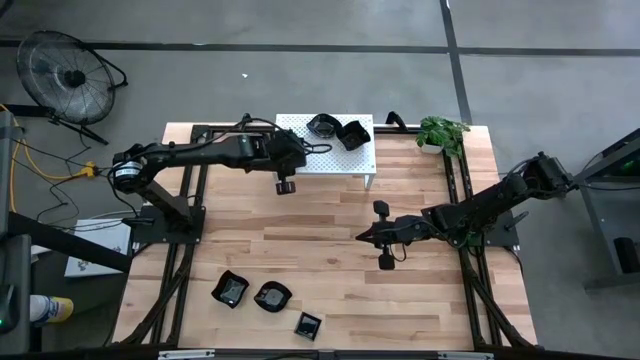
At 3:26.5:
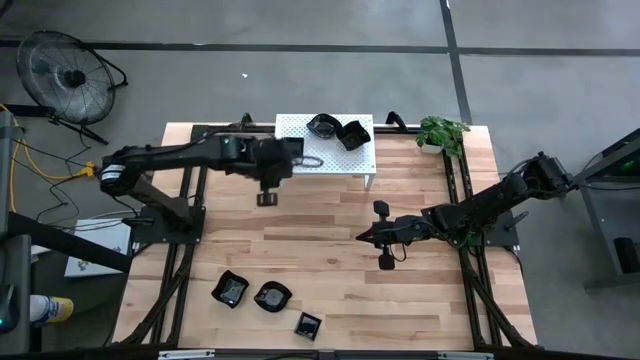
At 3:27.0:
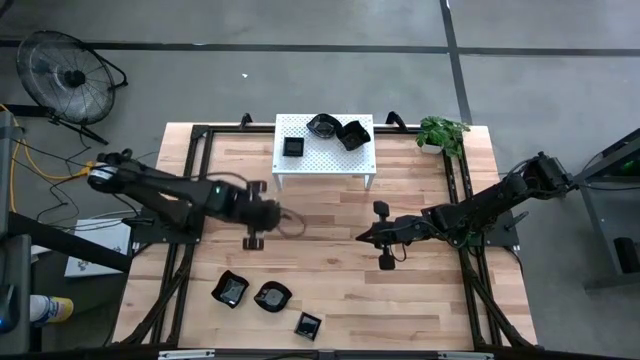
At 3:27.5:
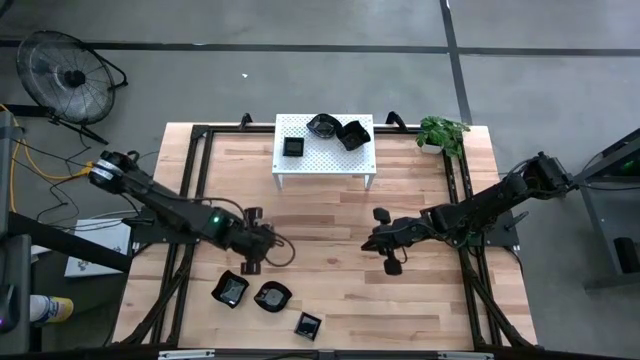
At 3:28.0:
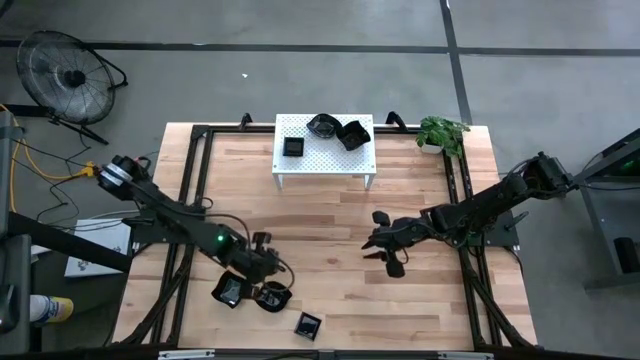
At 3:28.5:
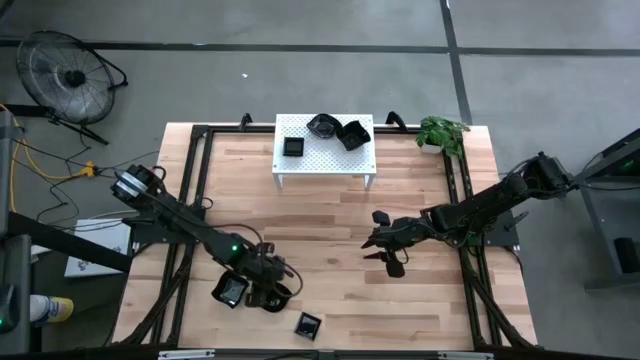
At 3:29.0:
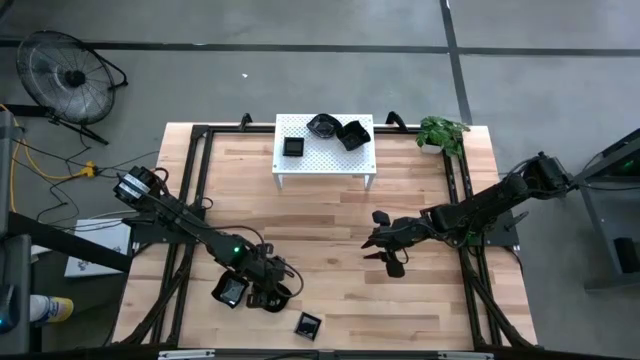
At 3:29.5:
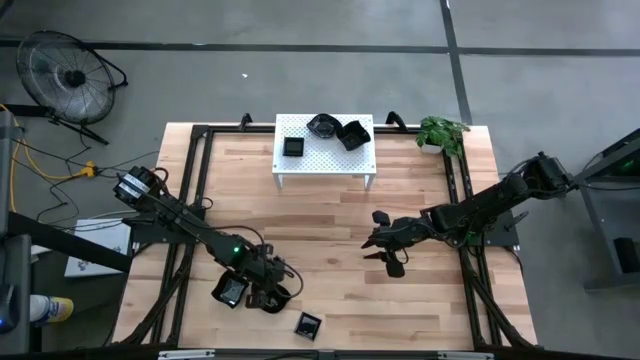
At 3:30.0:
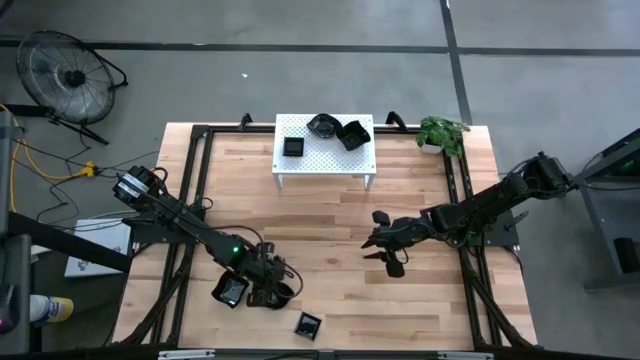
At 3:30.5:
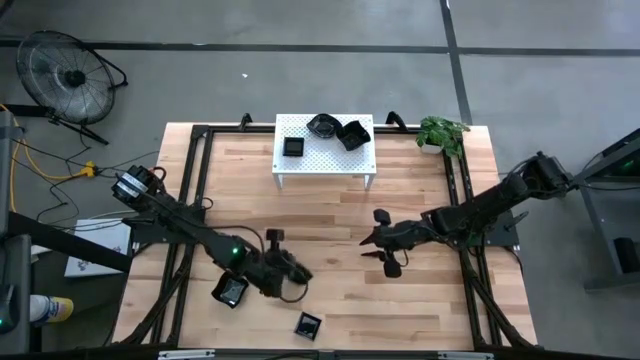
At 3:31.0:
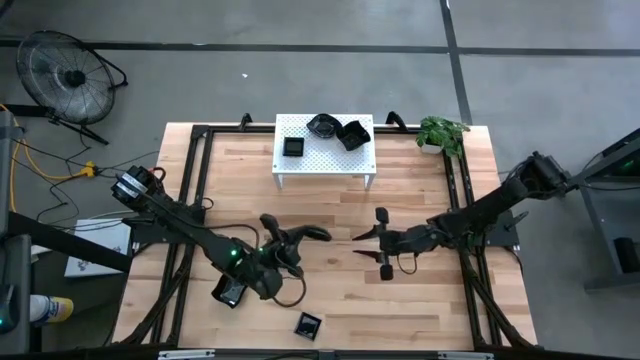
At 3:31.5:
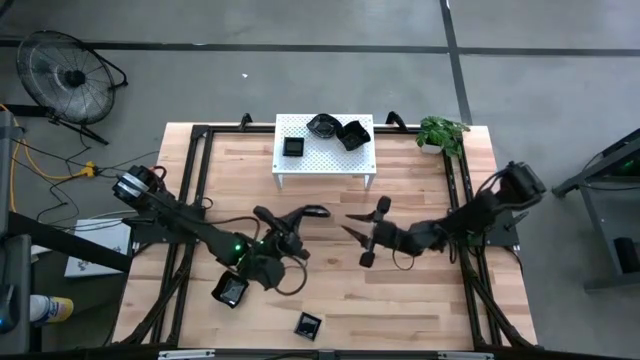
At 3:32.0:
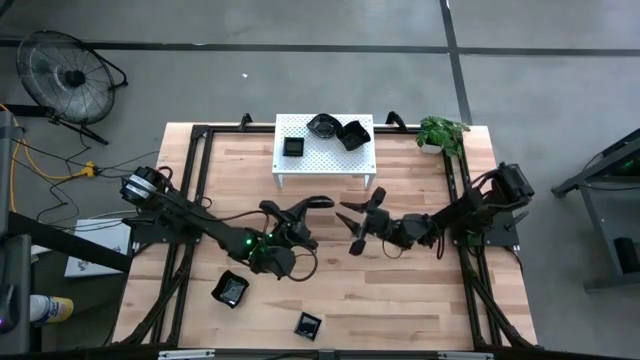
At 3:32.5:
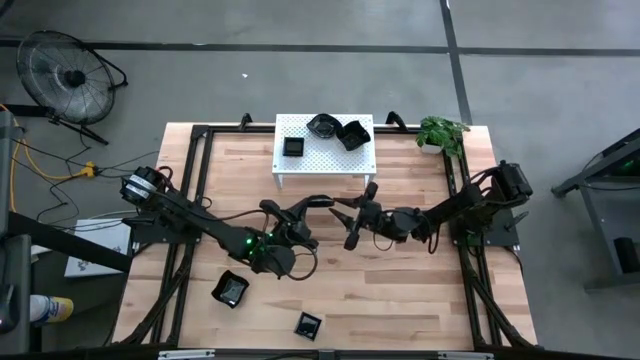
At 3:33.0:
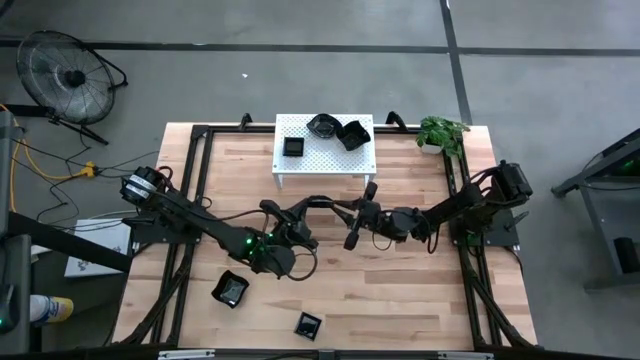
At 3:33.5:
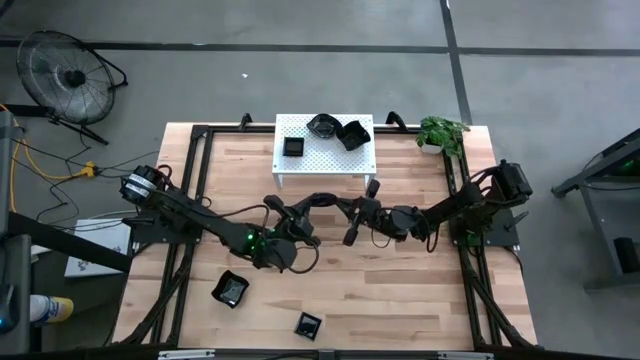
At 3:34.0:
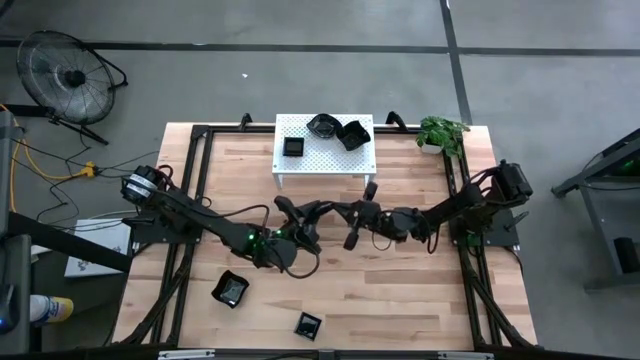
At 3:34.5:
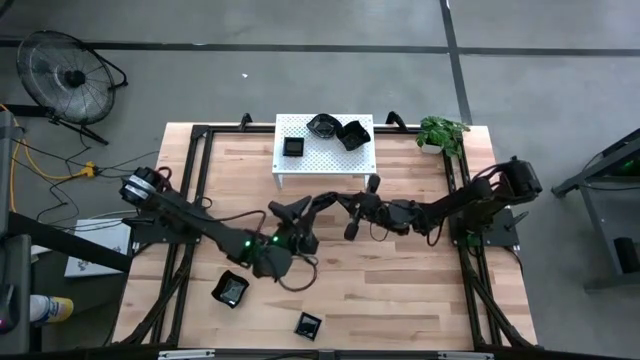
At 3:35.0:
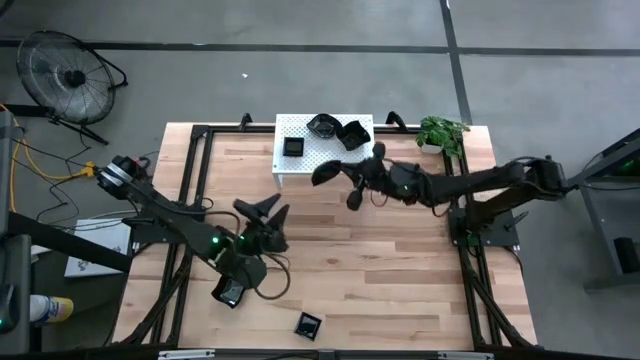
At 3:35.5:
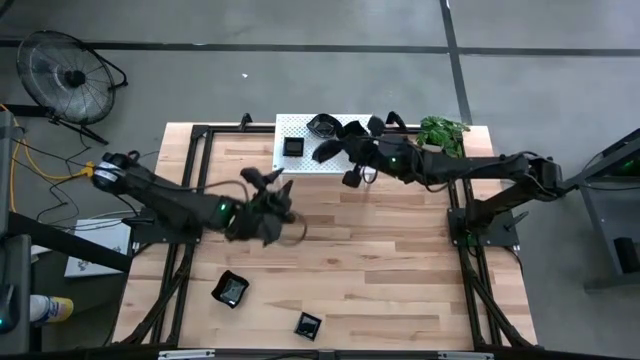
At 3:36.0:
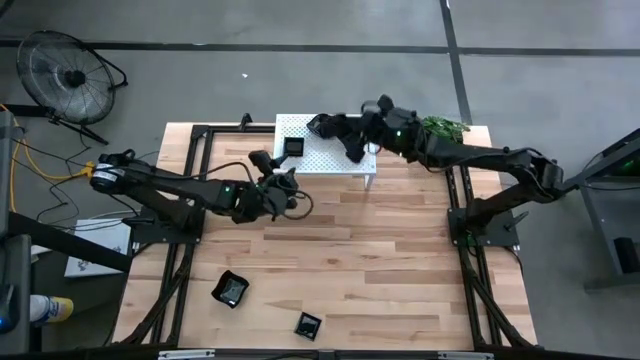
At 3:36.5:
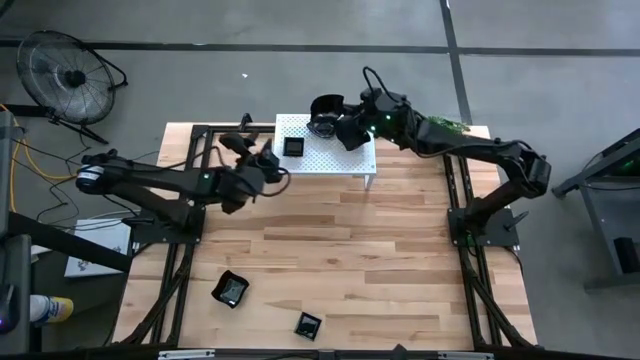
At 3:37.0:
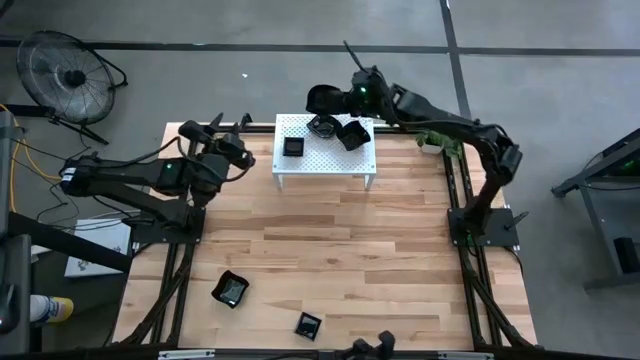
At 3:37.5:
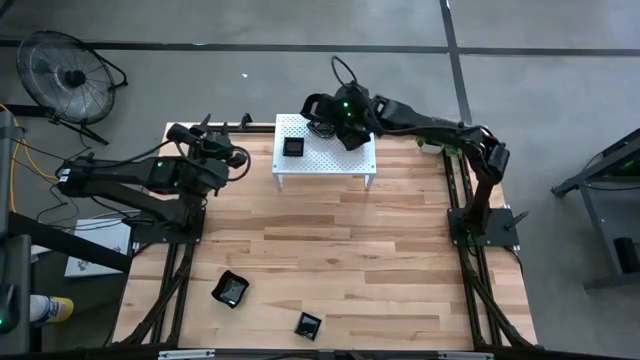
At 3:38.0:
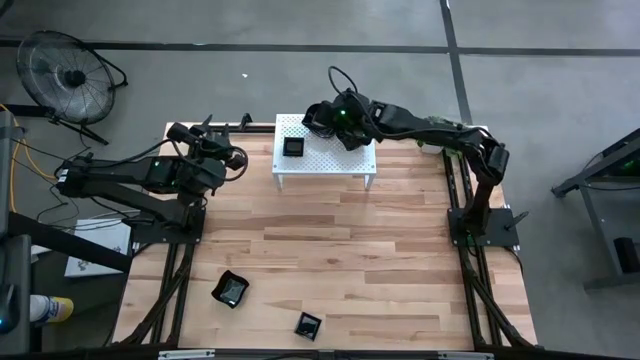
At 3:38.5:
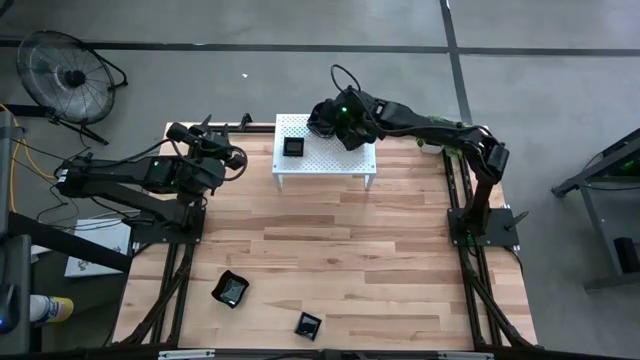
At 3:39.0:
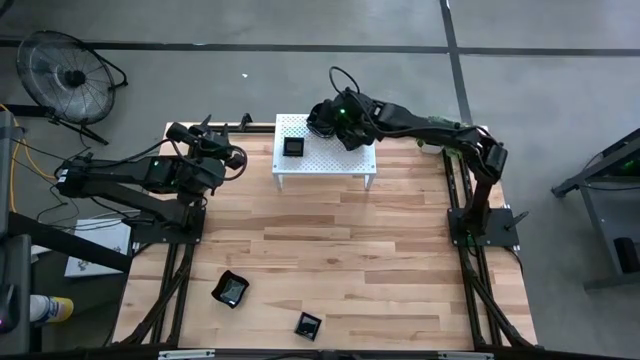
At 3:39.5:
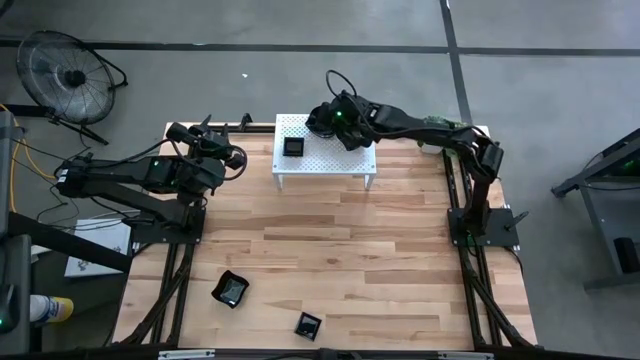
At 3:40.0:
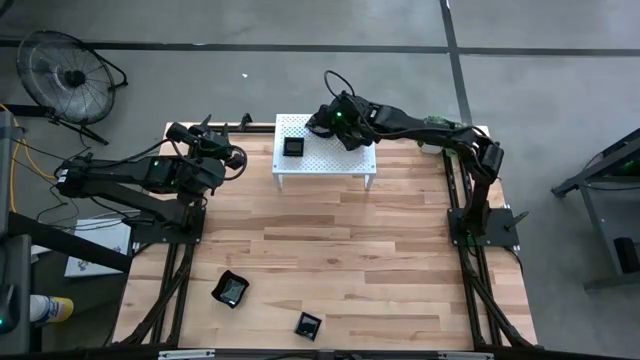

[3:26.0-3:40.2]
Task: Pick & Place Mini shaped plates
Stack the black leaf-shaped plate on top of the black leaf-shaped plate on the shelf

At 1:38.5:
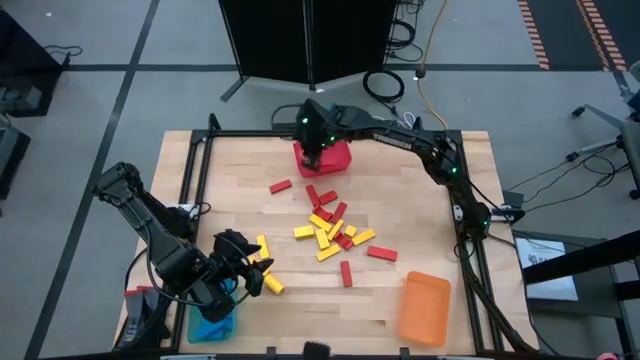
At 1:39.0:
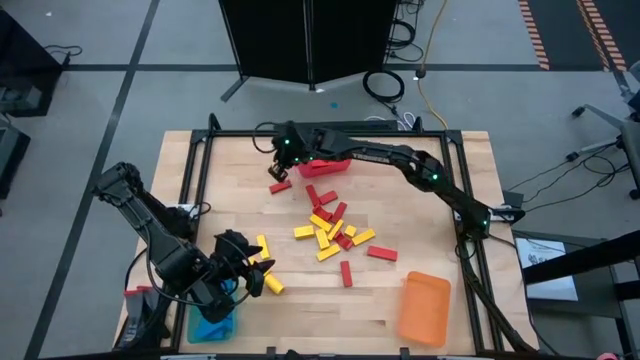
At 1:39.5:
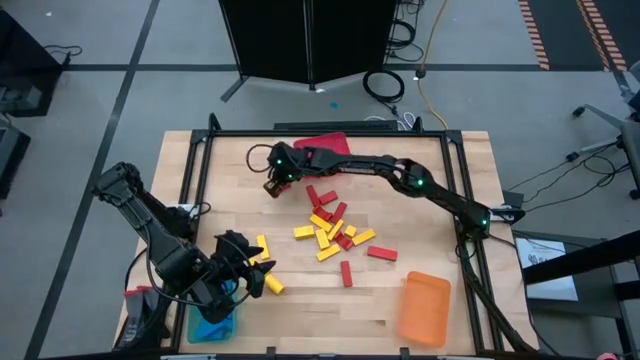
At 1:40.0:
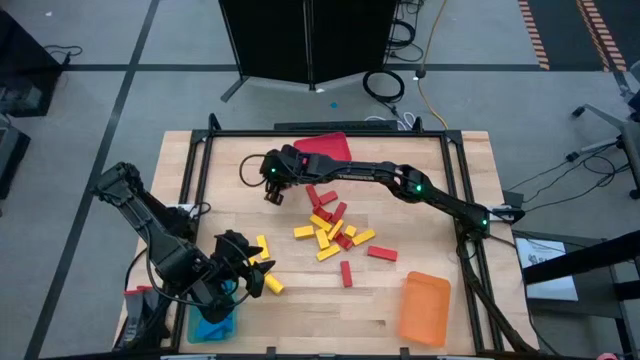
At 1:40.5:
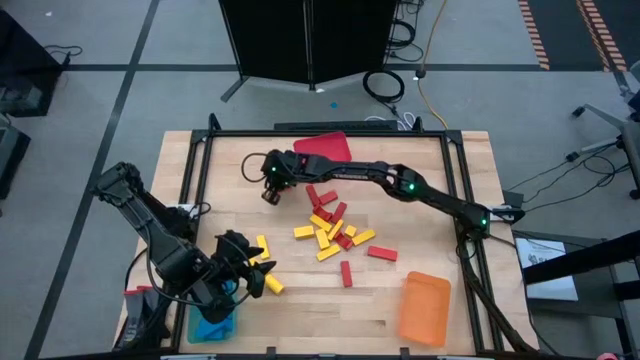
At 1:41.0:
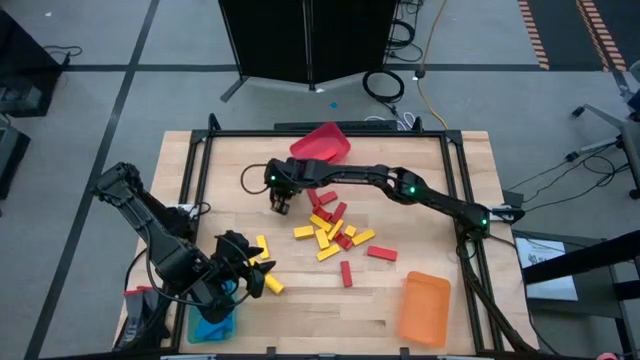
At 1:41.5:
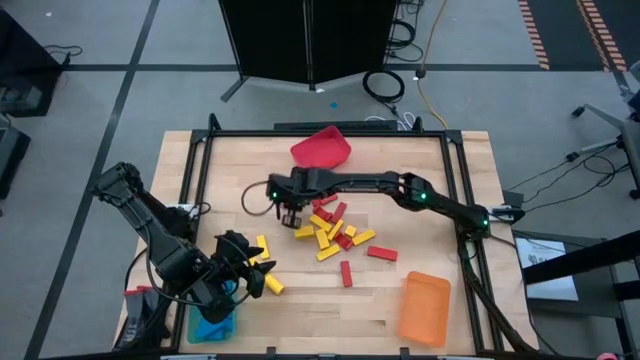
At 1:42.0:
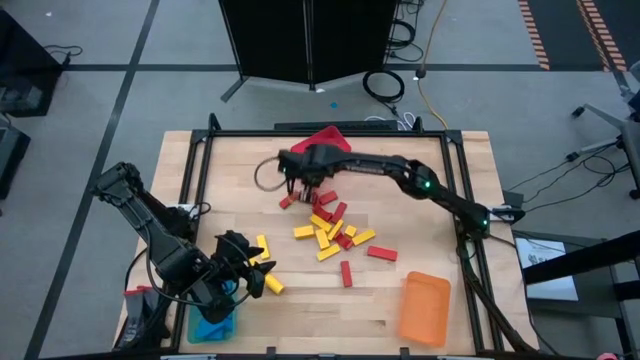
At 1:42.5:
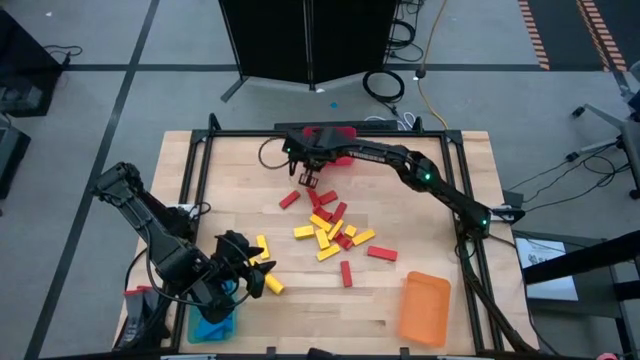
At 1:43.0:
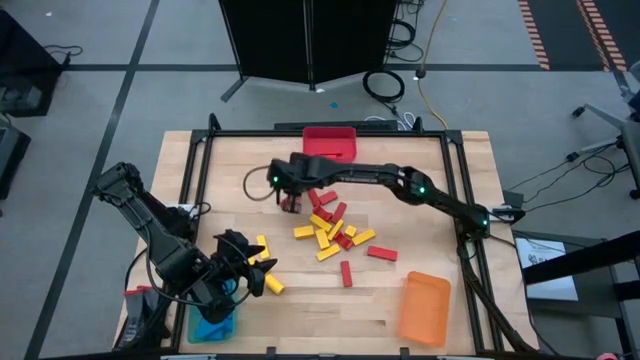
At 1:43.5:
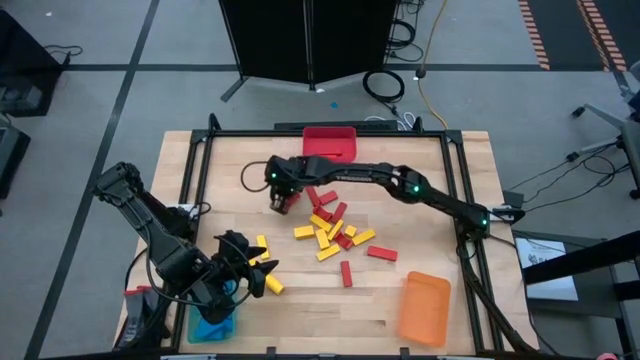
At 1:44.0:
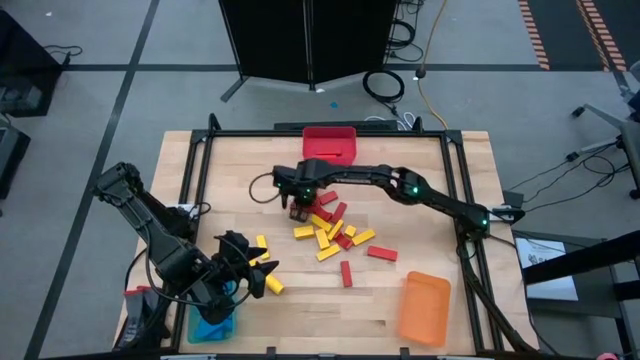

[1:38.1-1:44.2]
Task: Sort blocks
Adjust the red block and the red bin on the table
